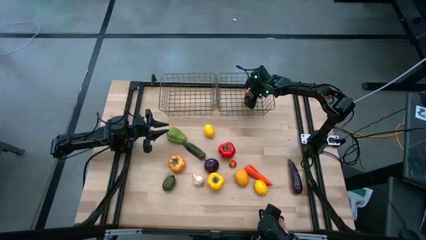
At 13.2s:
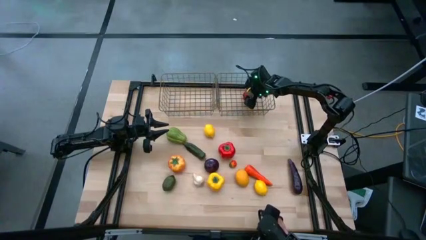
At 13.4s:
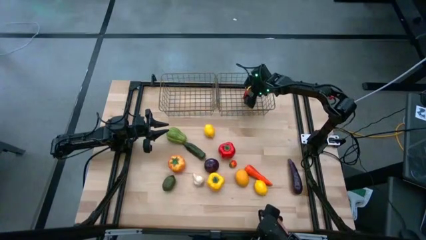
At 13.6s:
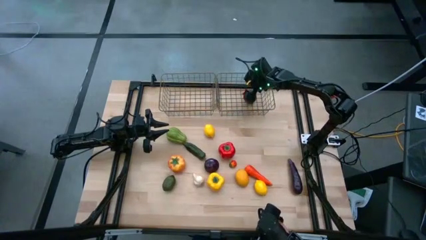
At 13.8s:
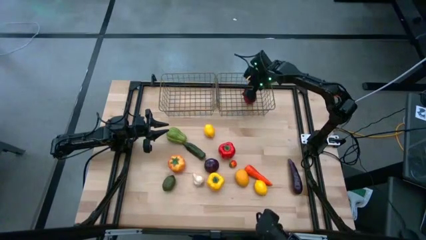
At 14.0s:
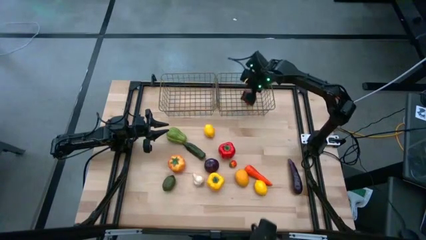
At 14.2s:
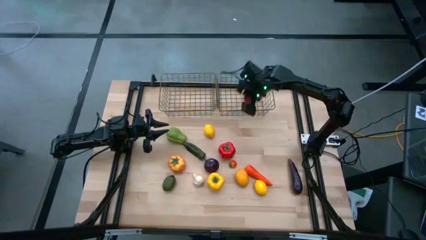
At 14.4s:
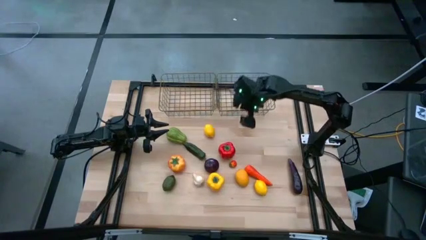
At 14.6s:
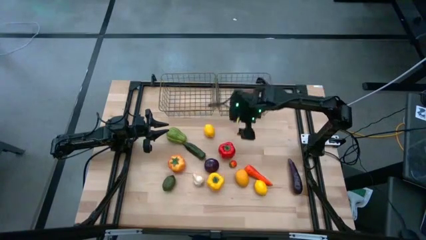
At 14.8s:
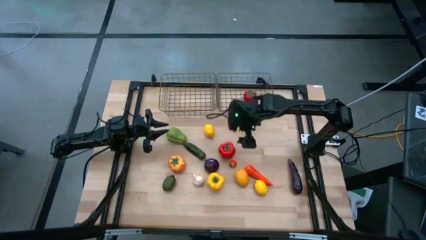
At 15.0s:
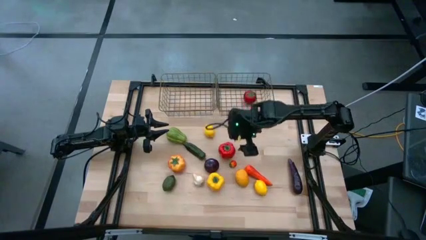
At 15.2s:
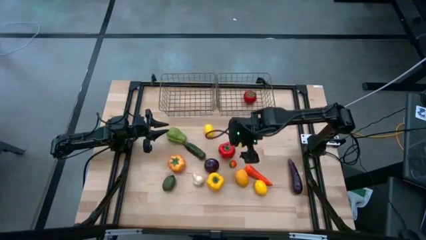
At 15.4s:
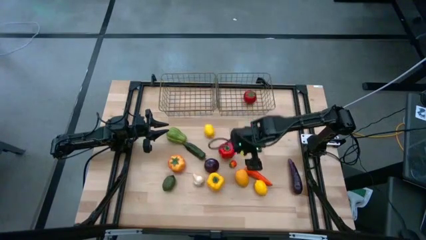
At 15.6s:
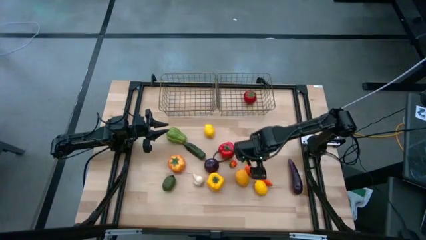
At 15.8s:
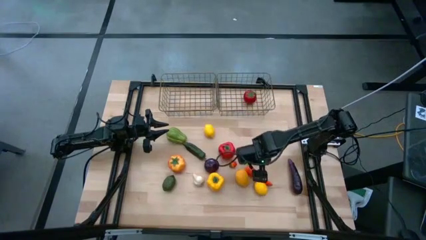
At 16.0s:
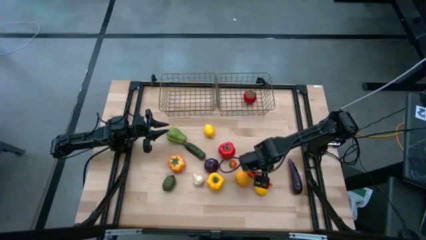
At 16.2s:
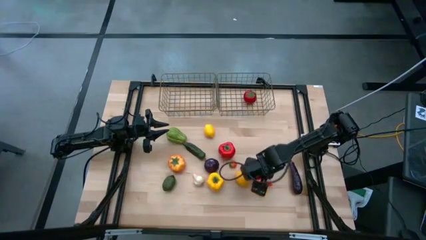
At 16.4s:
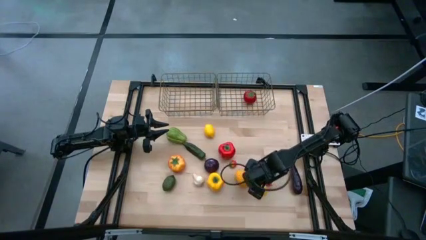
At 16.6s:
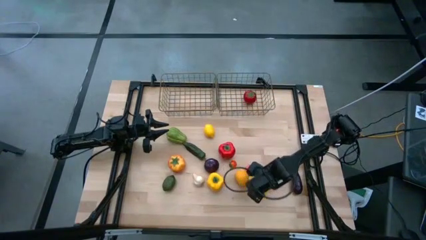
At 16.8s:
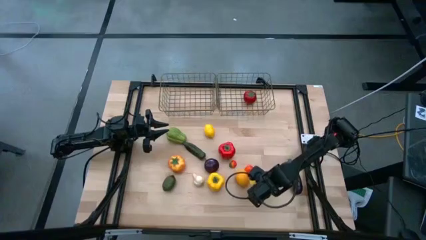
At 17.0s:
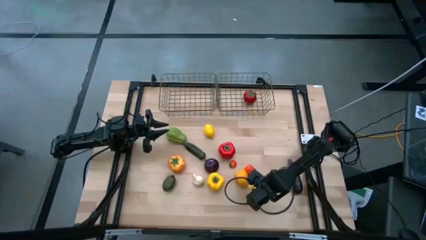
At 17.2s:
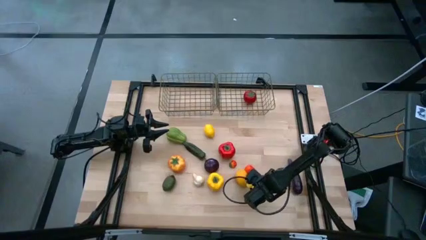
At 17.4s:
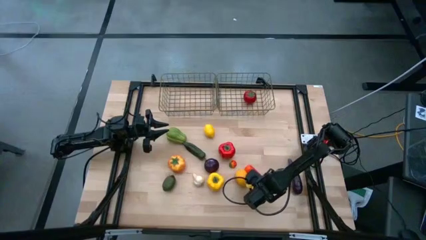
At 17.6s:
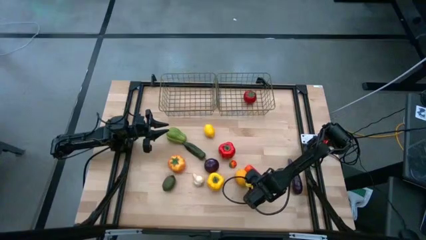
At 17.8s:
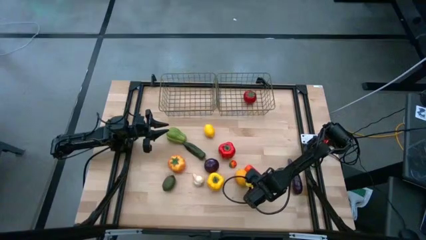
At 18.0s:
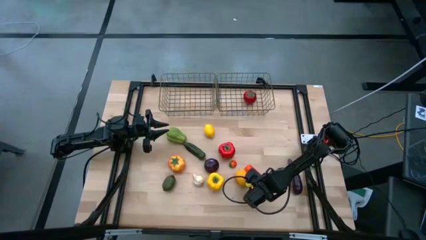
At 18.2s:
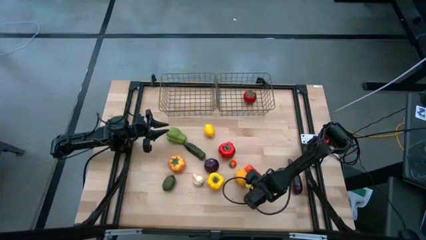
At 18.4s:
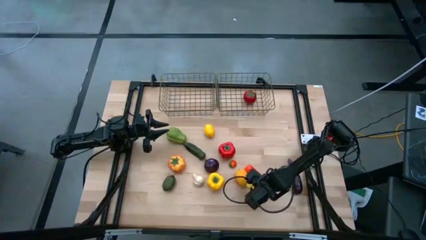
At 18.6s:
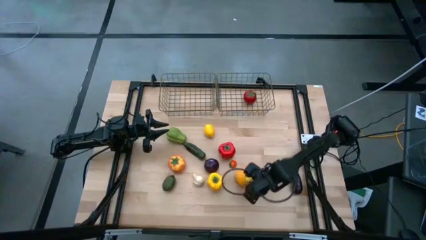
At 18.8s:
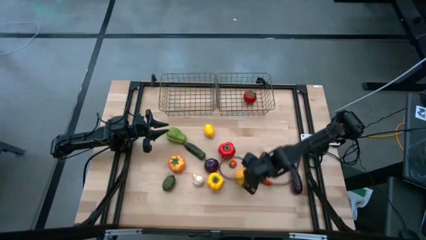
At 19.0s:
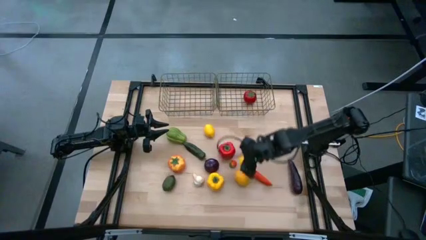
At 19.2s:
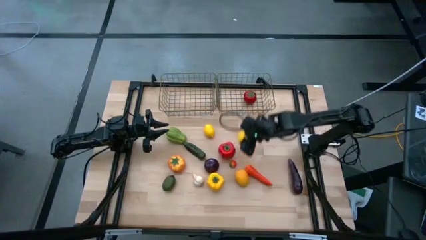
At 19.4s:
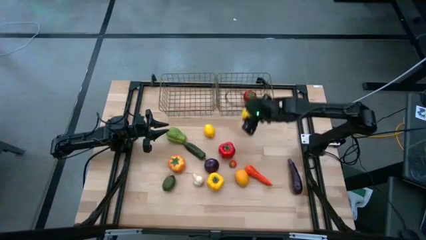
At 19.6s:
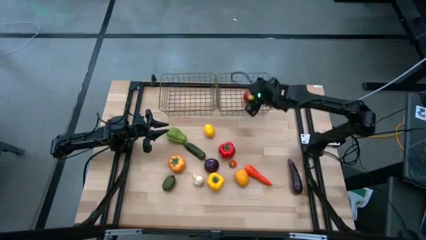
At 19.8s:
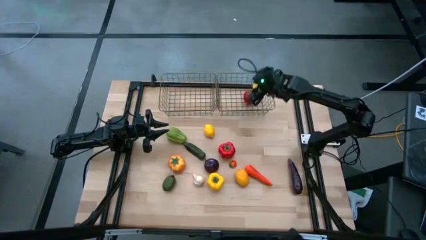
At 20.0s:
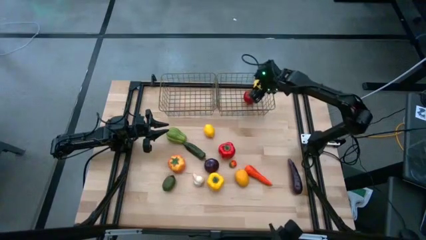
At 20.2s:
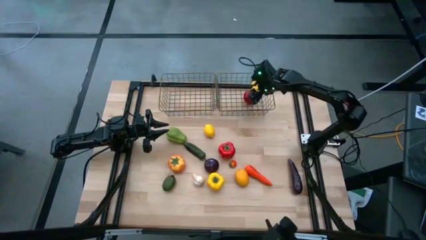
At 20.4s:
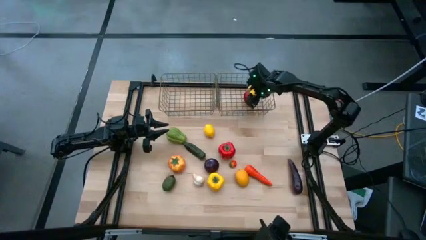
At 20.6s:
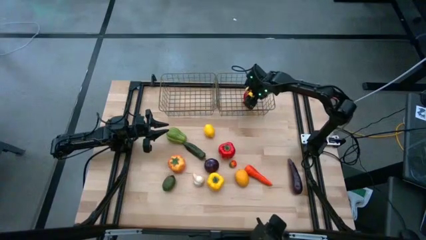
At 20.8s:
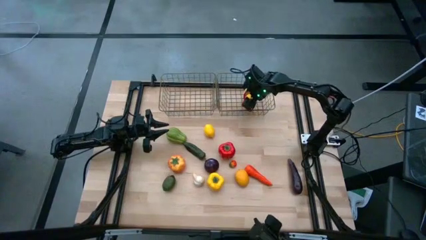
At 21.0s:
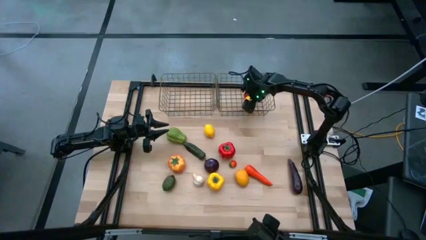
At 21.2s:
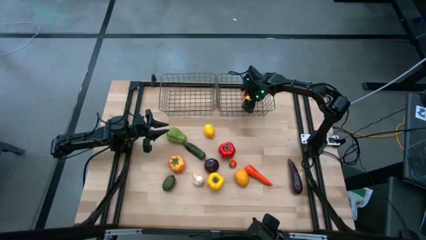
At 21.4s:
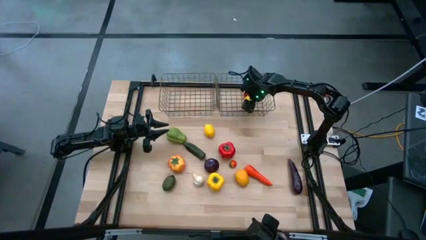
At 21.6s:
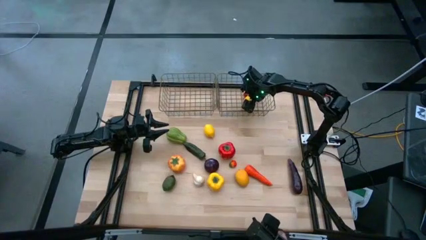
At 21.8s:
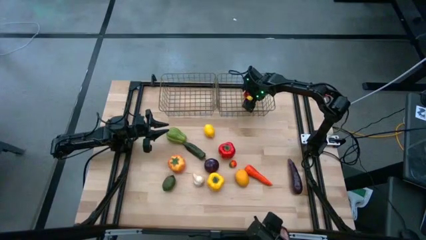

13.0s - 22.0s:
Task: Sort produce into baskets
Put the bottom yellow lemon into the right golden wire basket

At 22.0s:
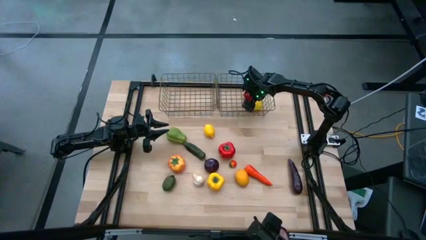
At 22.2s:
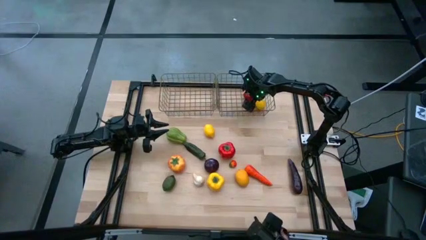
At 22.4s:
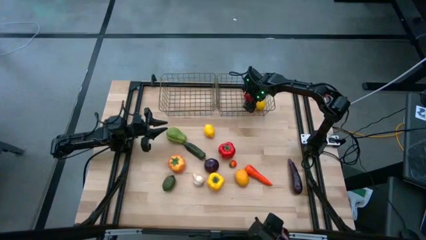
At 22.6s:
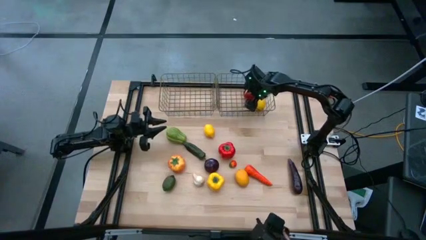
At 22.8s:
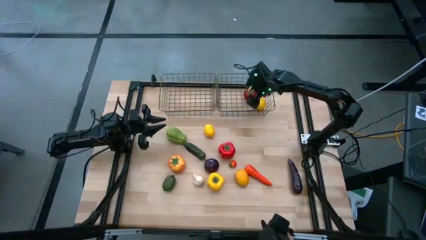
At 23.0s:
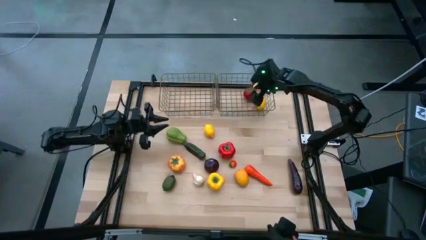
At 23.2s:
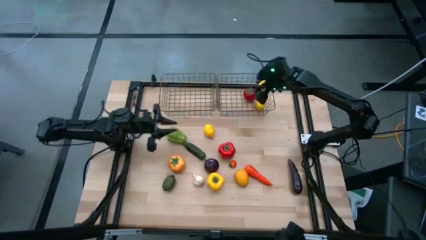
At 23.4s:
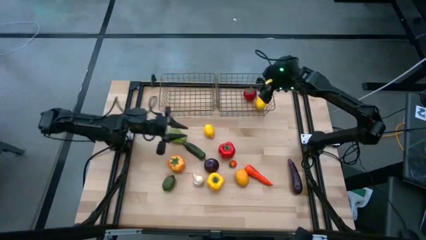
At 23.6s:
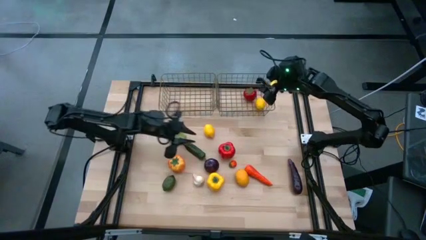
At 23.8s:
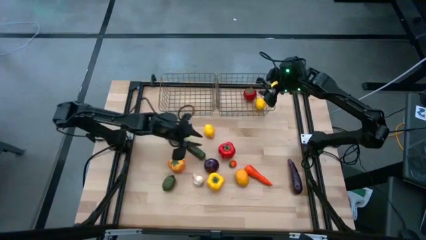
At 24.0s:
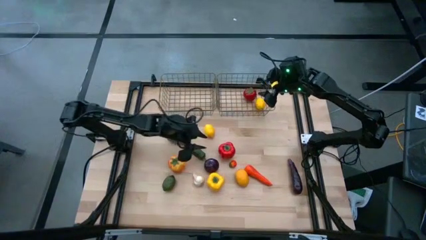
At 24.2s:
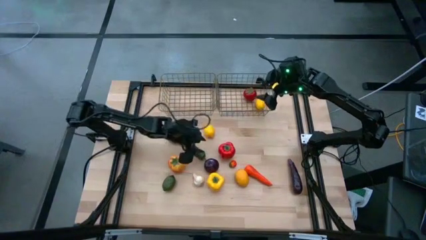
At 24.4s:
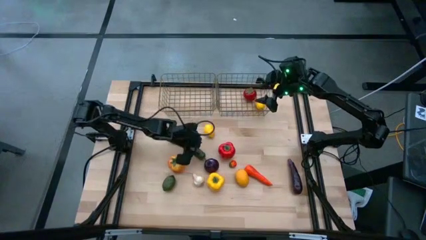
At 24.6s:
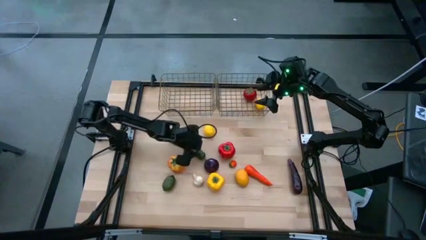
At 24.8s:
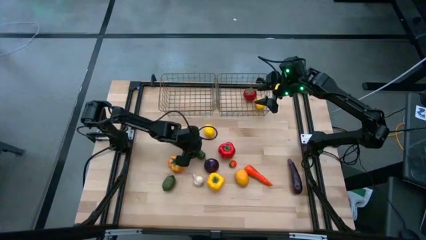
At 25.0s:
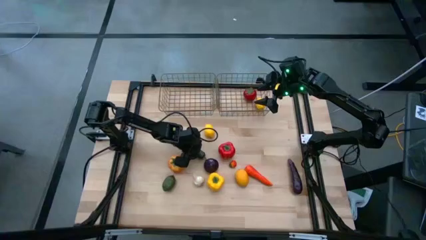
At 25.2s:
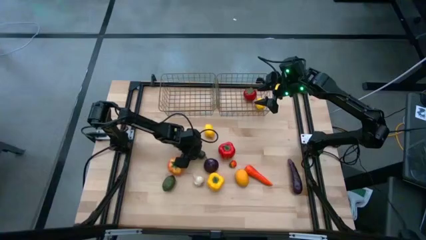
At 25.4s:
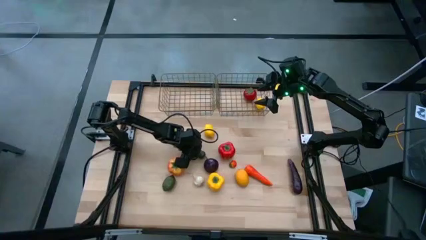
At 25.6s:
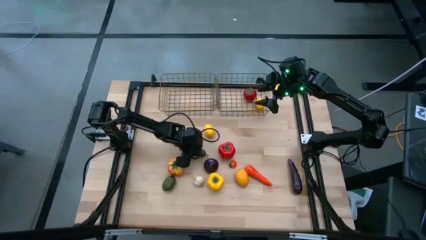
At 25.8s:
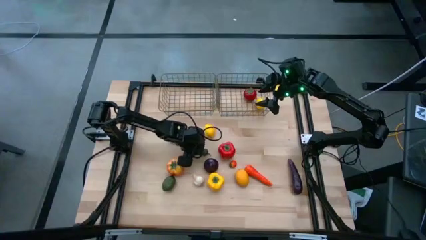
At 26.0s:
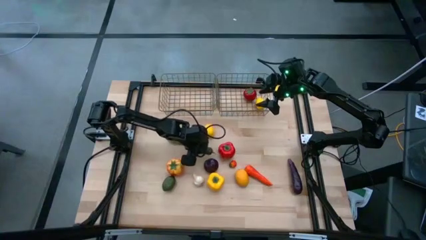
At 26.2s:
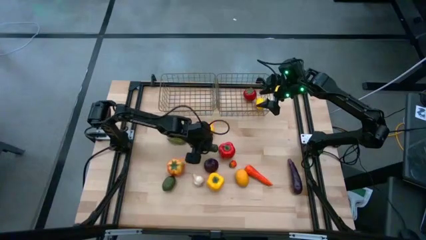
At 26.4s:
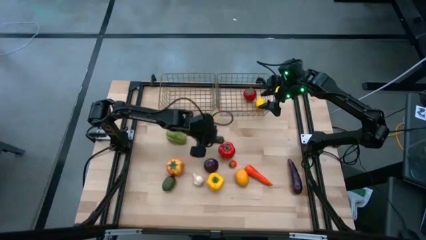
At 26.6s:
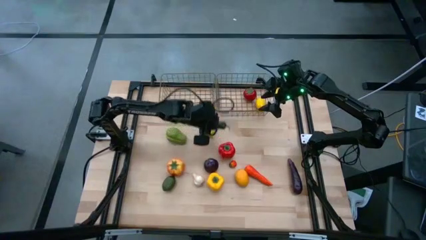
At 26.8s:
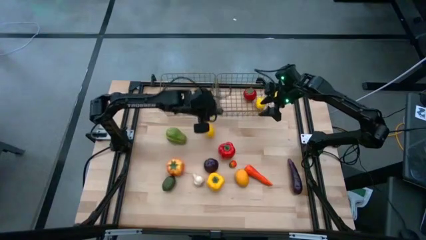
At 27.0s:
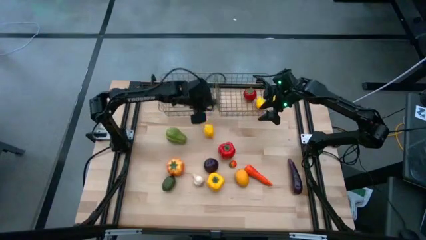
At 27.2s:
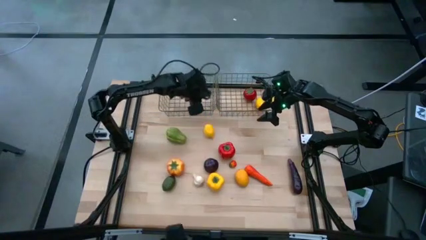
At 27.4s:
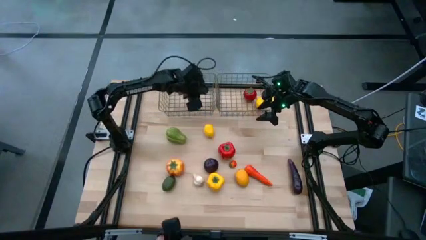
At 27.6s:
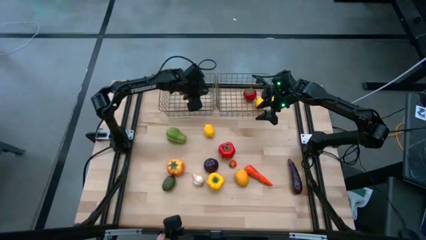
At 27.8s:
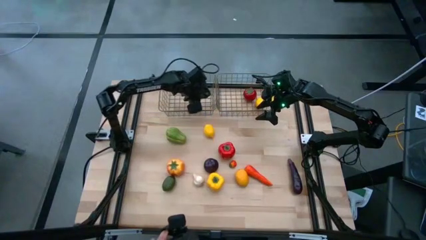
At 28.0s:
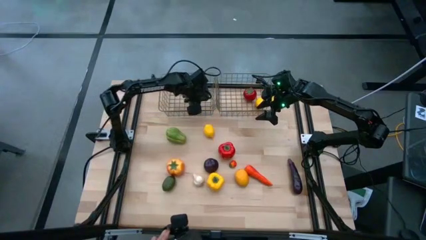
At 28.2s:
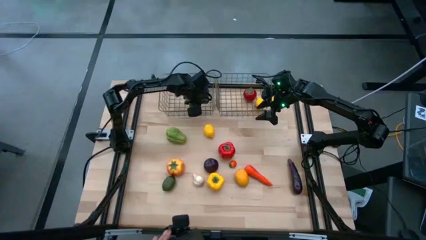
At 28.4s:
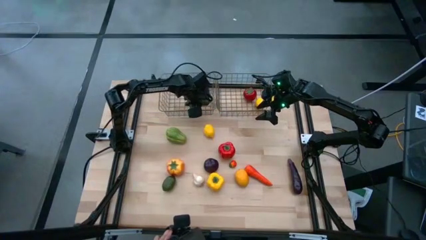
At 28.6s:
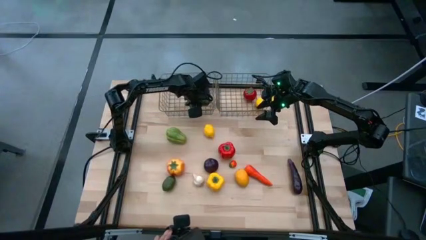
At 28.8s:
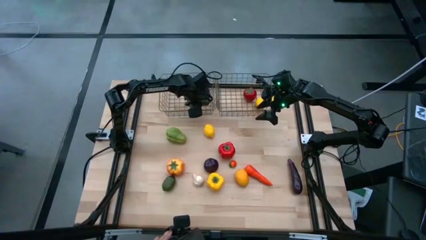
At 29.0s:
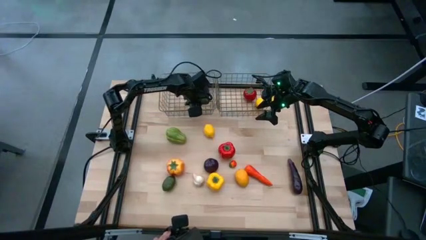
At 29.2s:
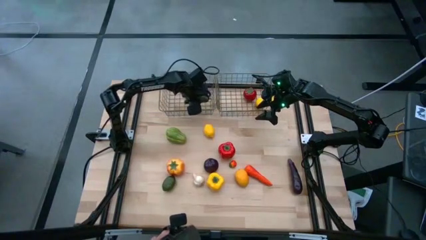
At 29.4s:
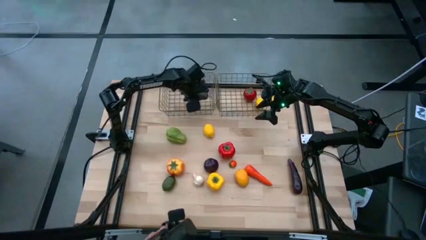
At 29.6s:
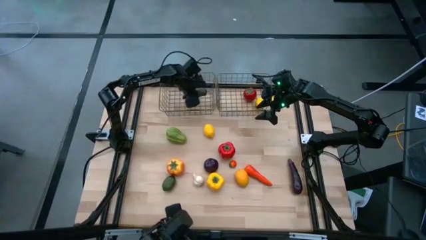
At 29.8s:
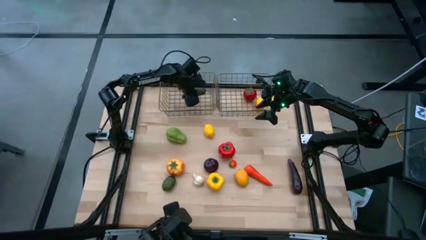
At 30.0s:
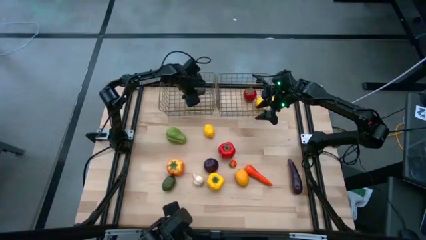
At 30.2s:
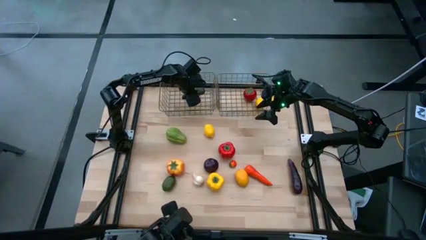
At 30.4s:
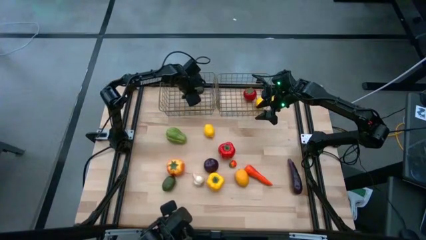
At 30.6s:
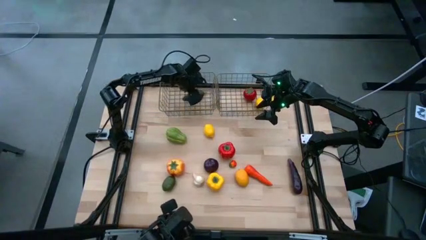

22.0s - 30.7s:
Put the green chili pepper into the left golden wire basket
